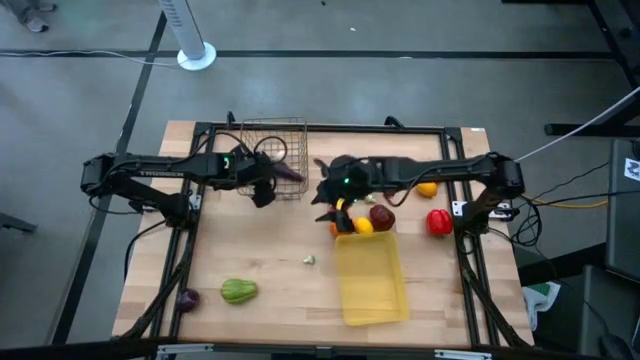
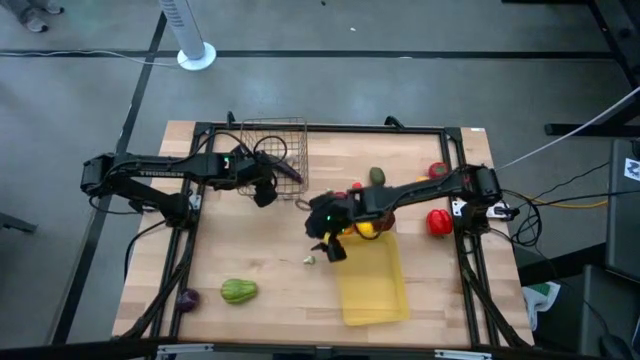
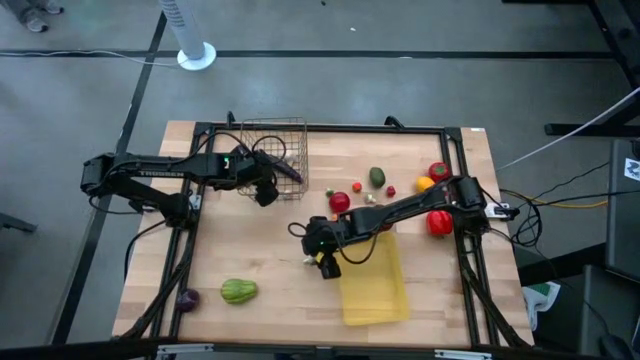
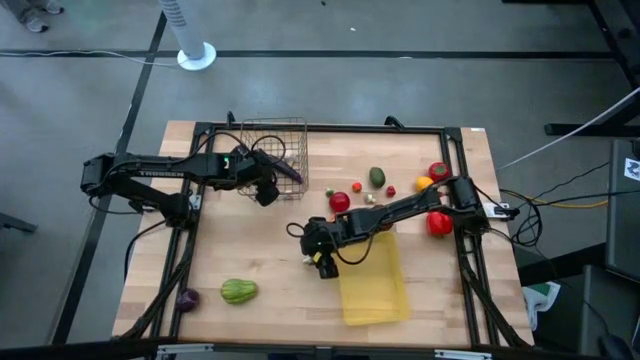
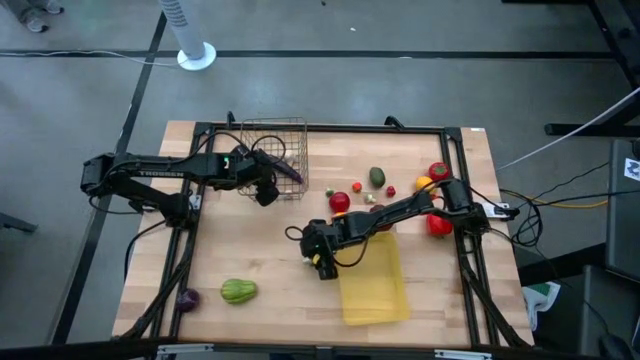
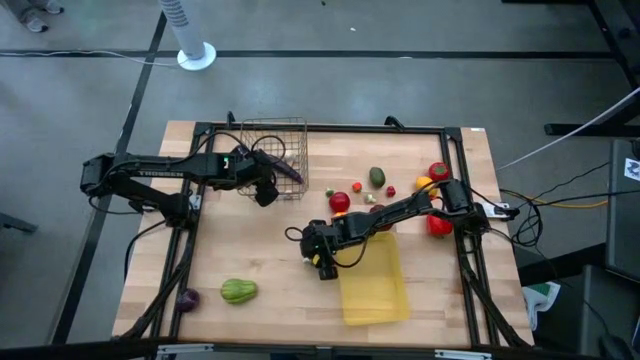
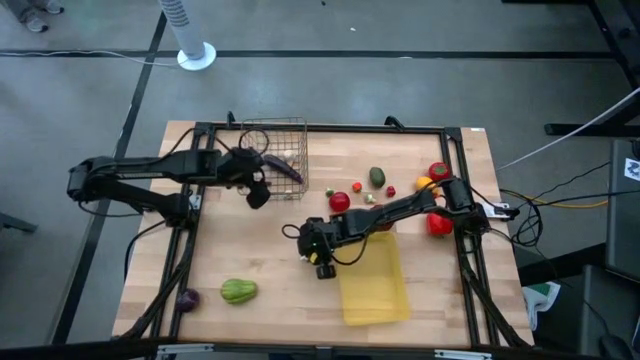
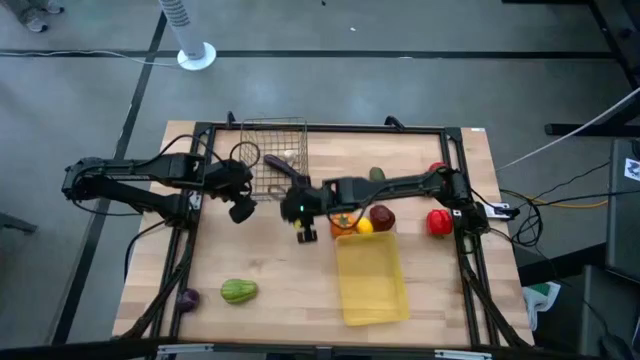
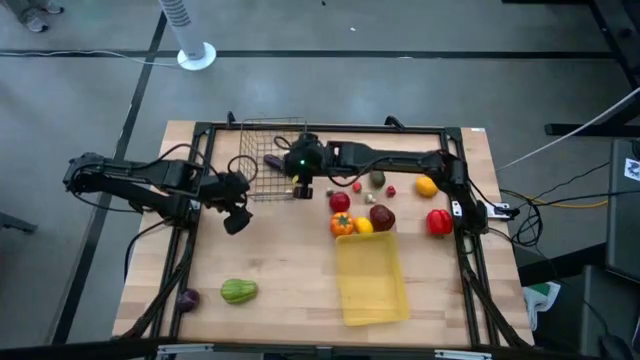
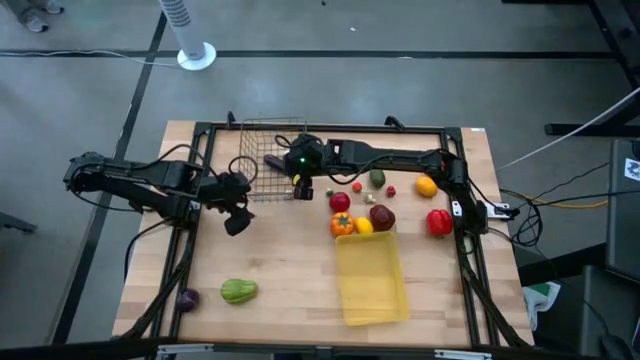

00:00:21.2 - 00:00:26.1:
Task: Sort produce into baskets
Put the bottom green mushroom into the brown wire basket

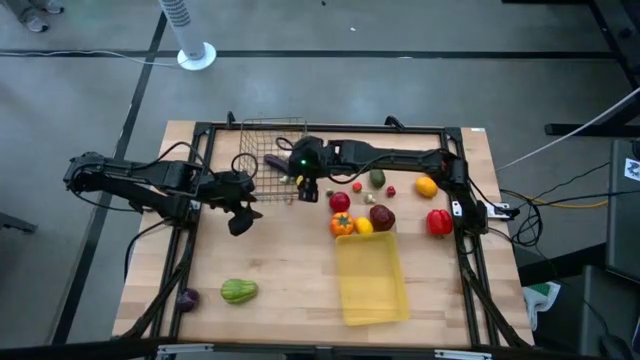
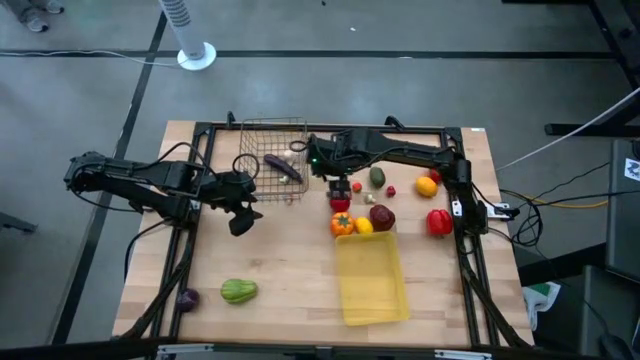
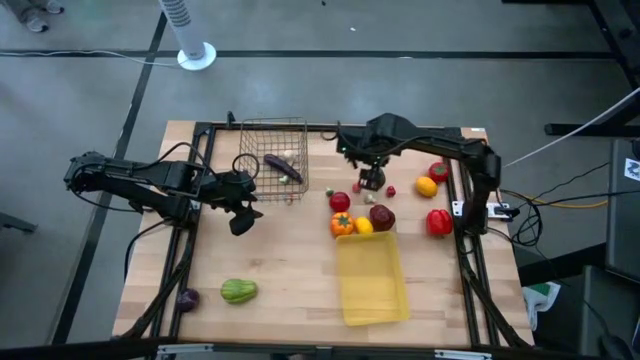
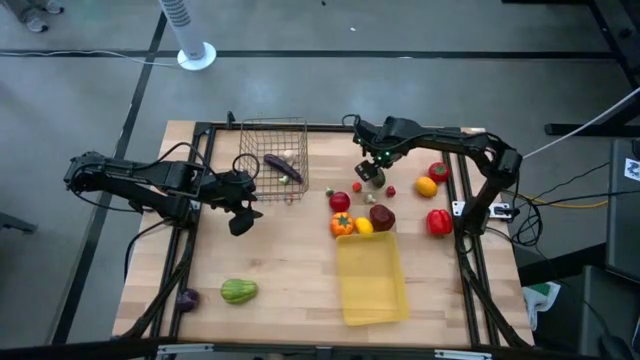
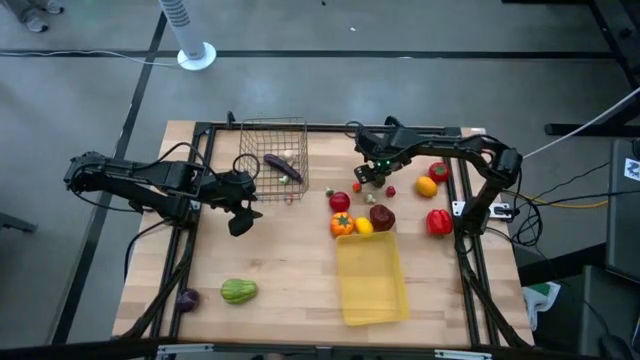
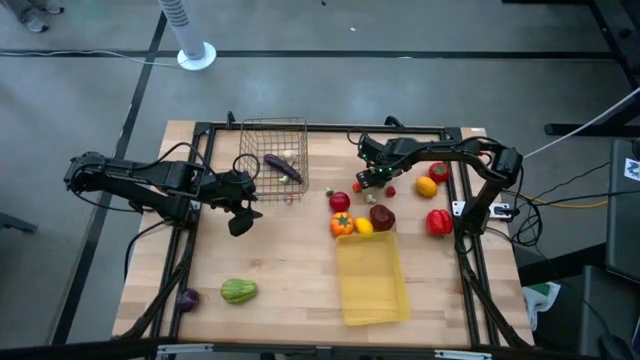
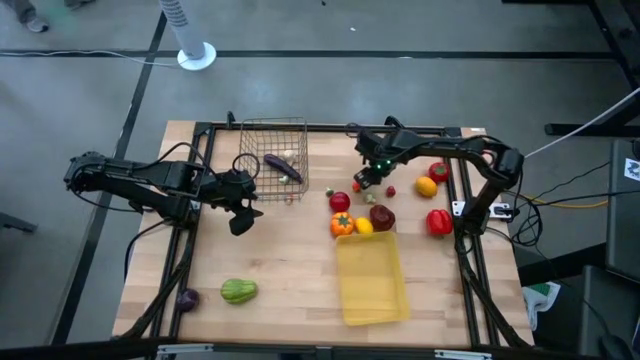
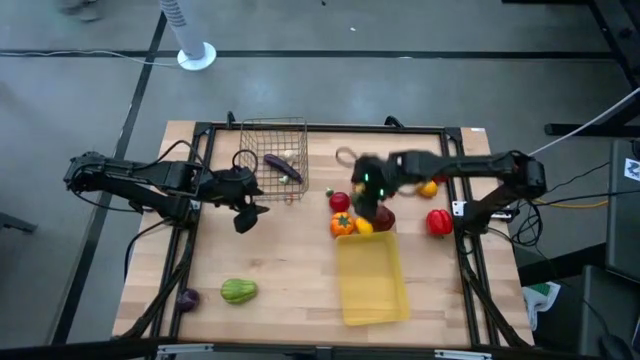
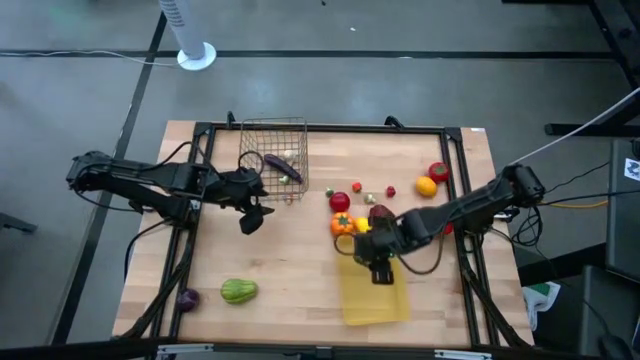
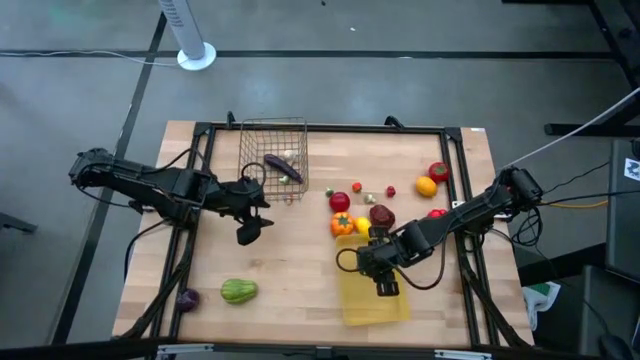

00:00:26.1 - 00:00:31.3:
Put the lime into the yellow bin

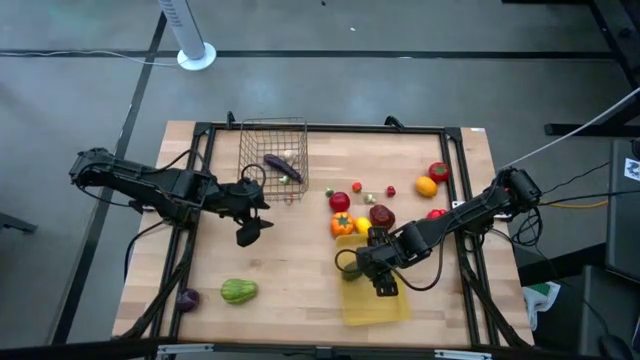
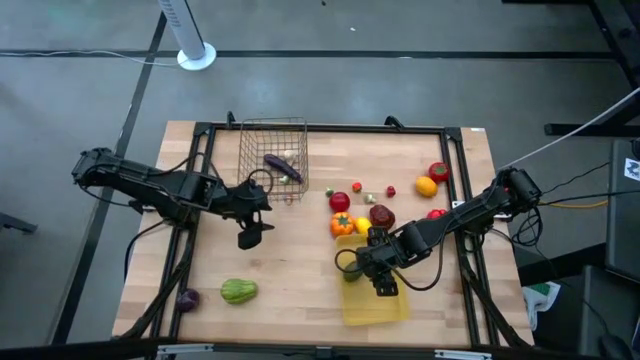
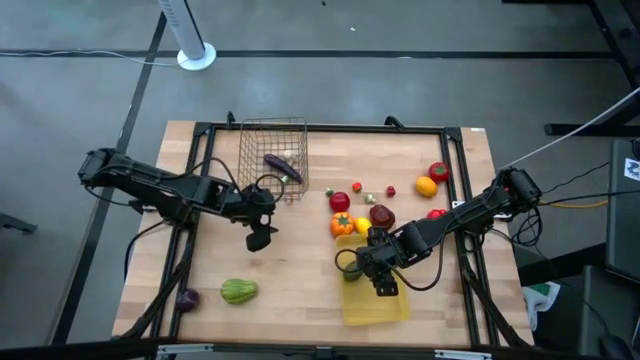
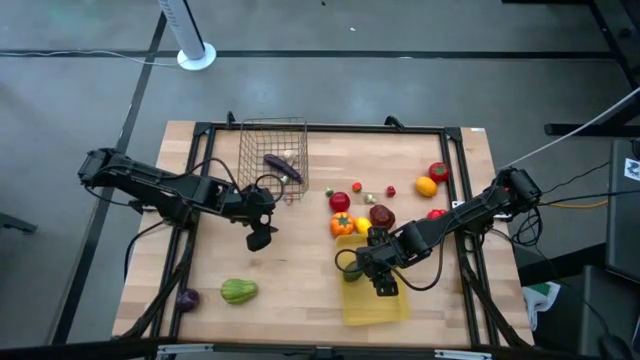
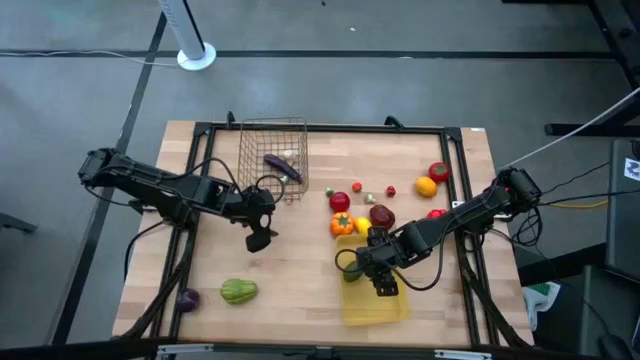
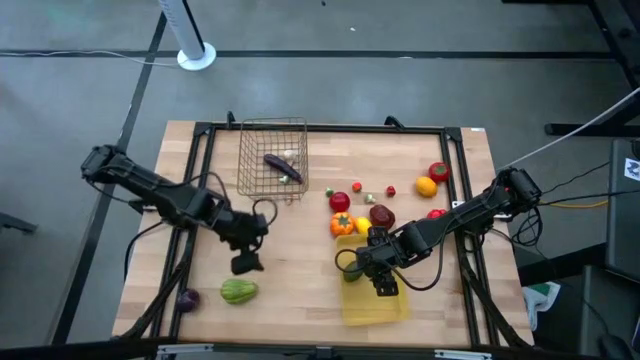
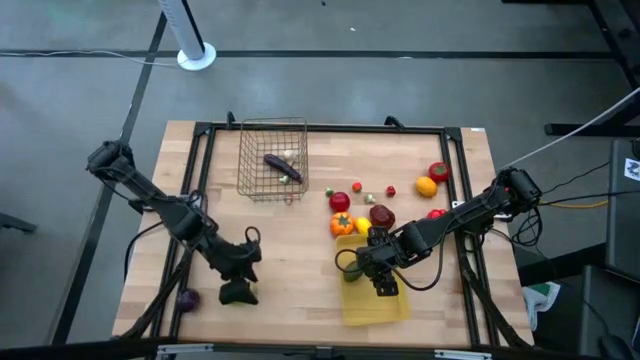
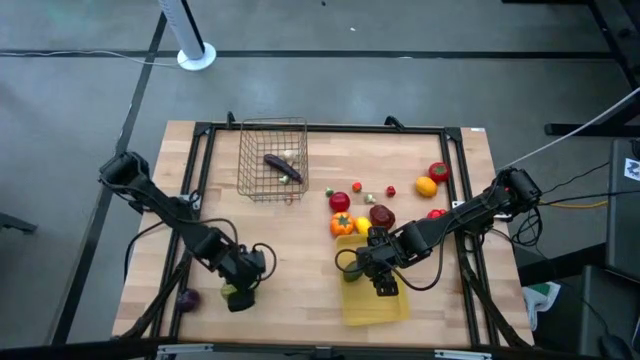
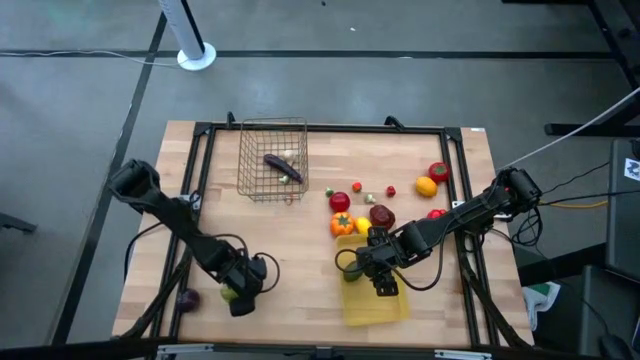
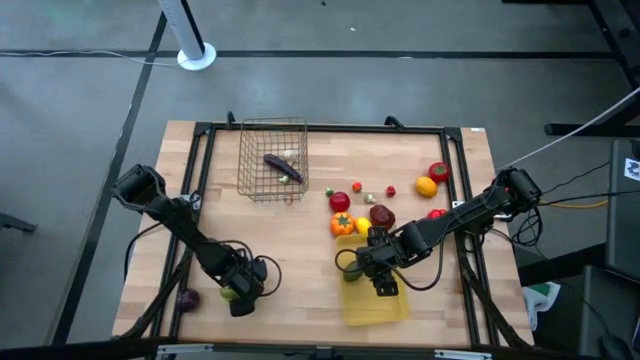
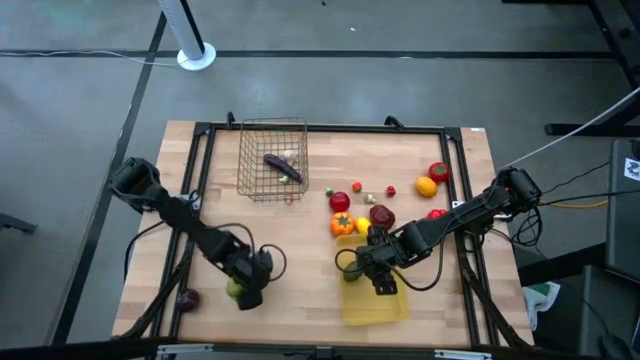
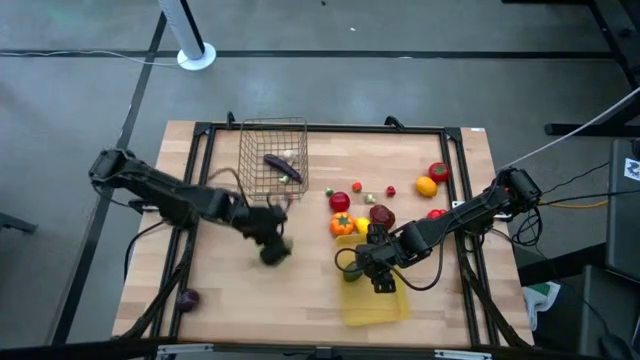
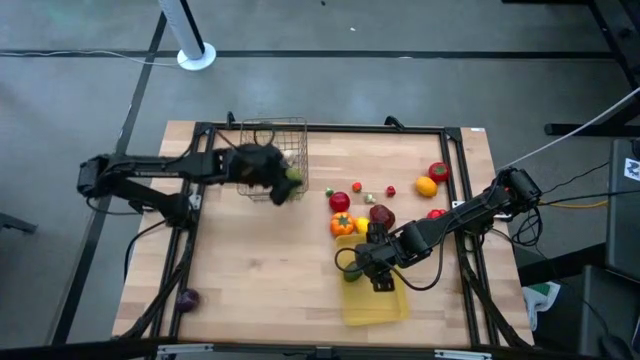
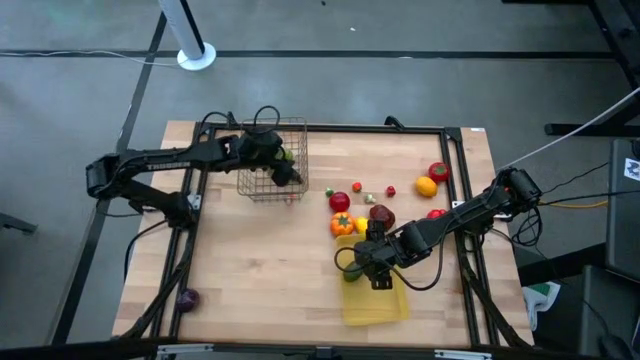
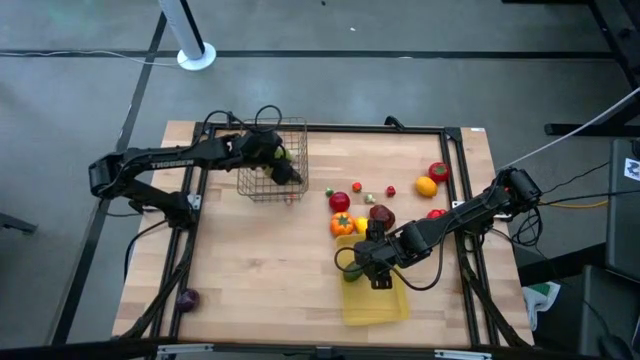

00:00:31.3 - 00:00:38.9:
Put the chayote into the brown wire basket

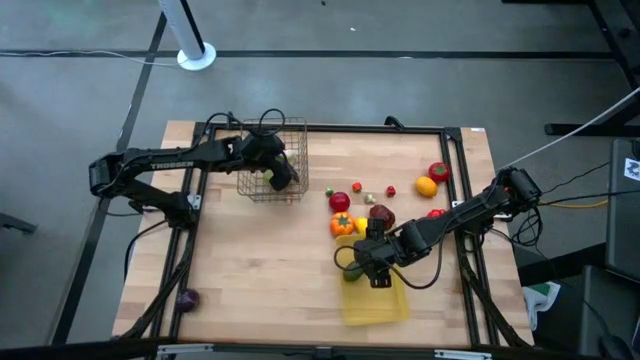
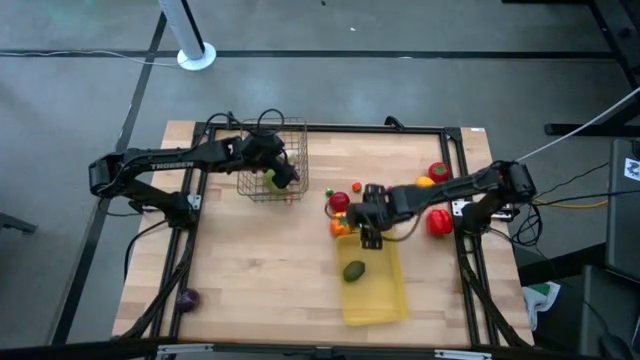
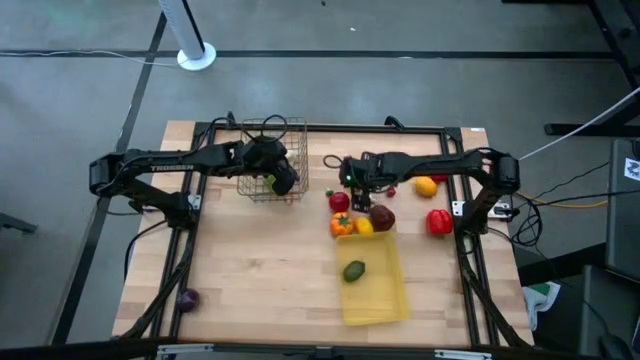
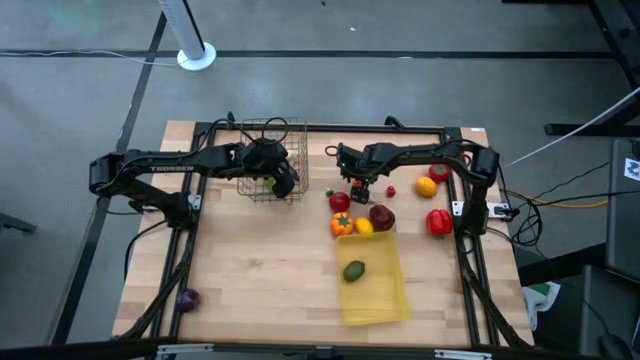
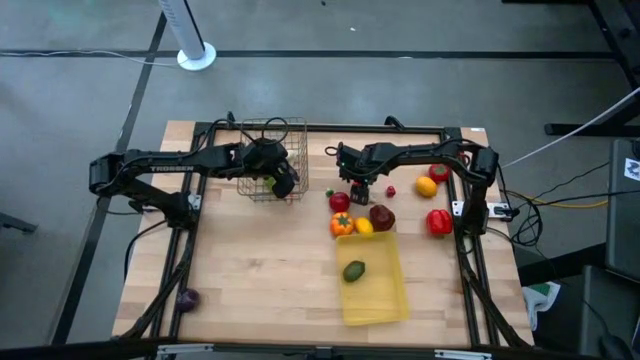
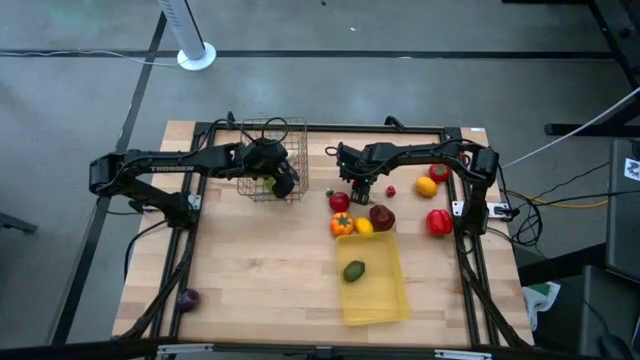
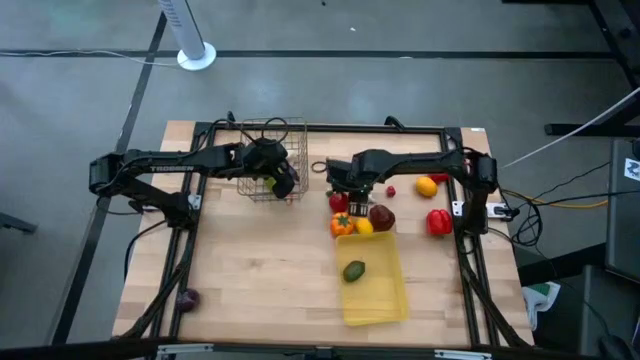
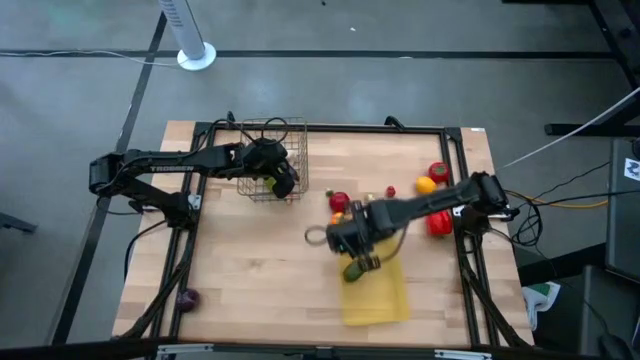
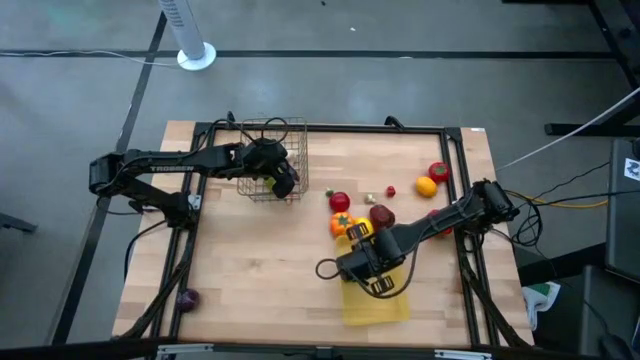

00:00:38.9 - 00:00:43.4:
Put the peach into the yellow bin
